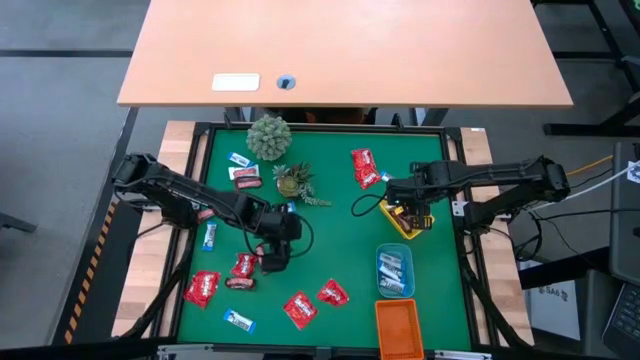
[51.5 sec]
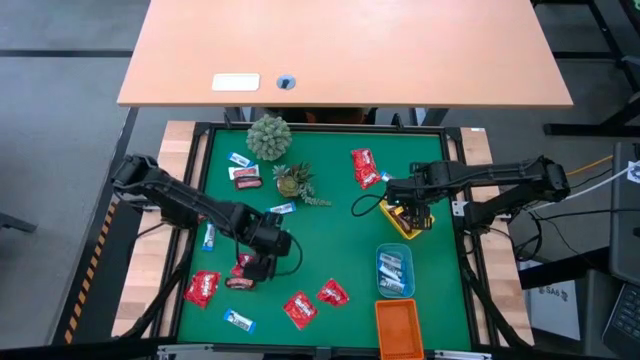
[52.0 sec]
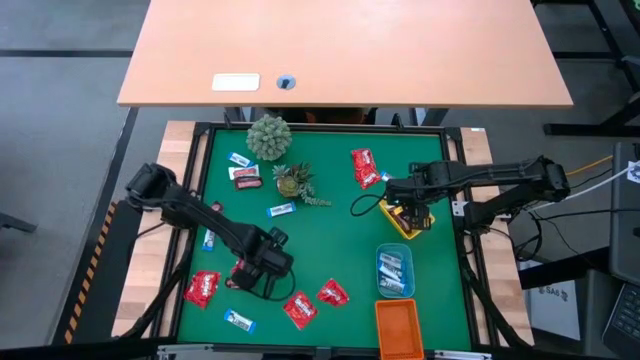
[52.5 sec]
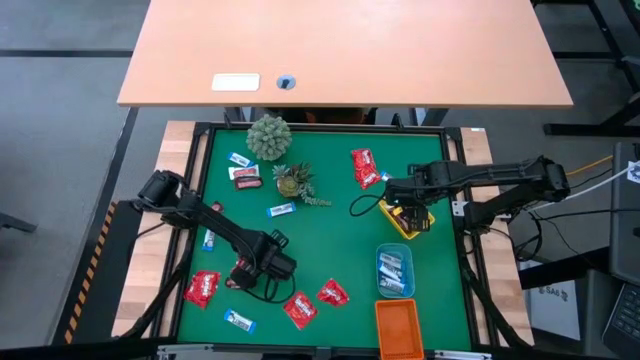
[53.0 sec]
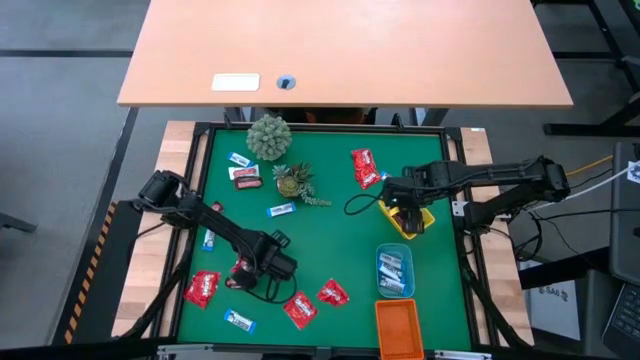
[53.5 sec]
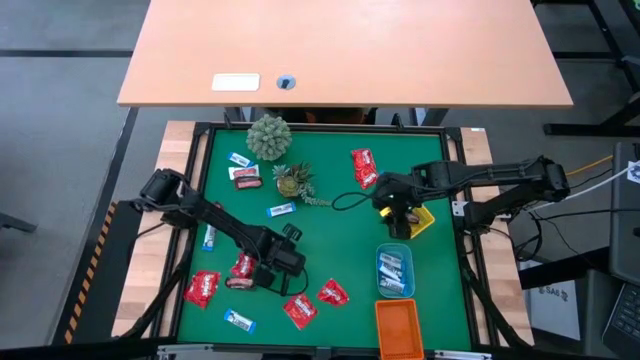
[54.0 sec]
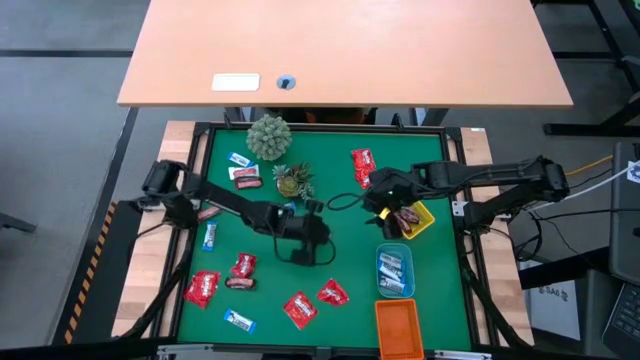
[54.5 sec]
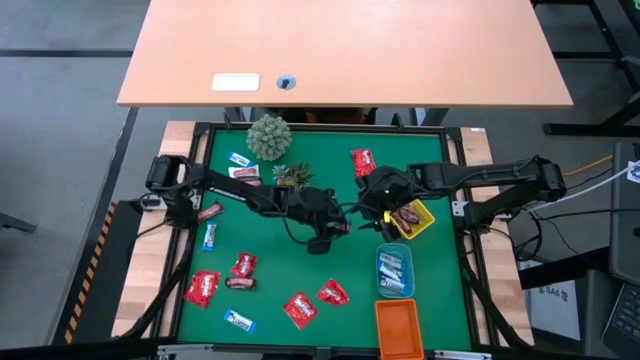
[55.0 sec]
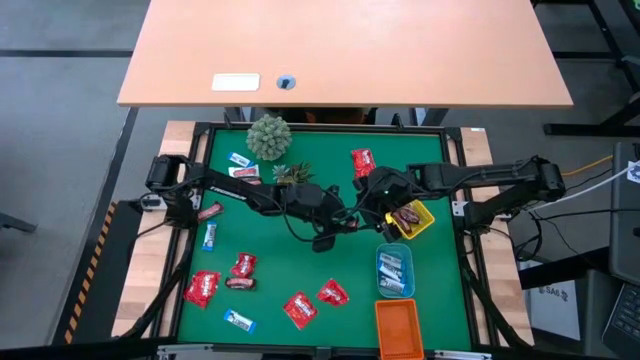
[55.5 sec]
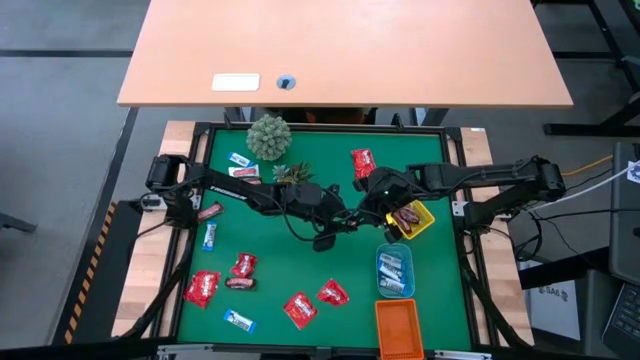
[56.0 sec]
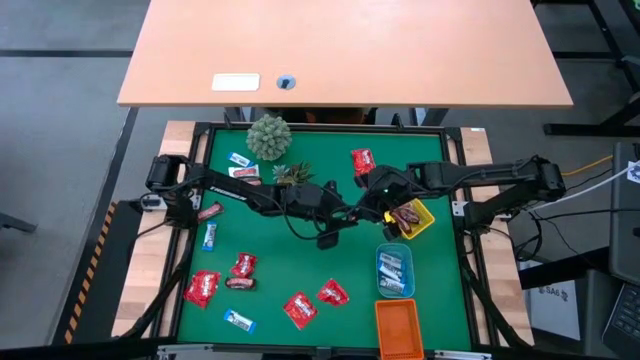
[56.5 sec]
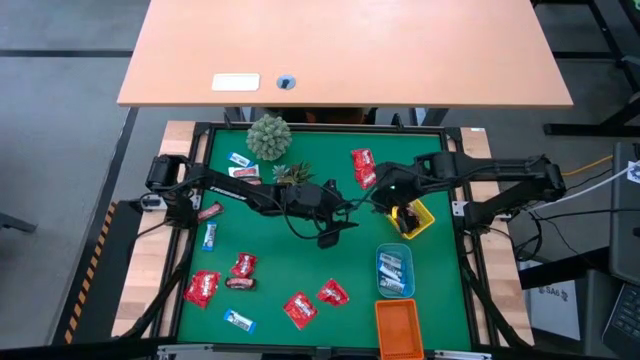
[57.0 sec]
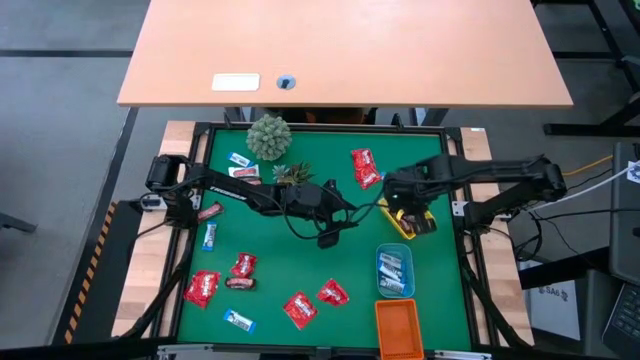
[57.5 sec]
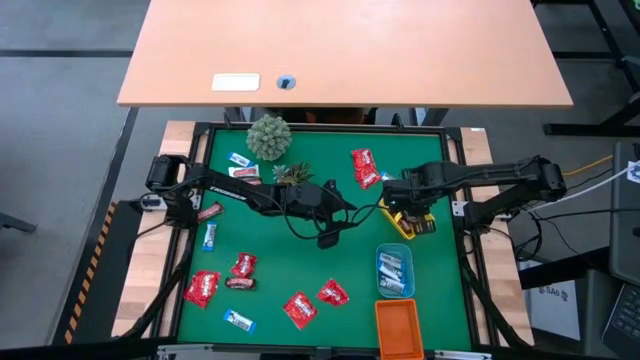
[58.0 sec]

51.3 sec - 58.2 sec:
Task: Sort candy
Put the brown candy into the yellow bin

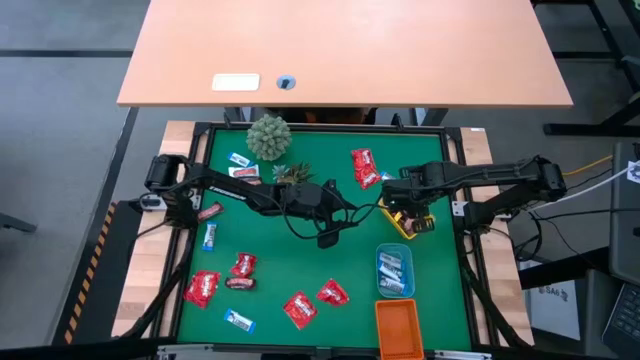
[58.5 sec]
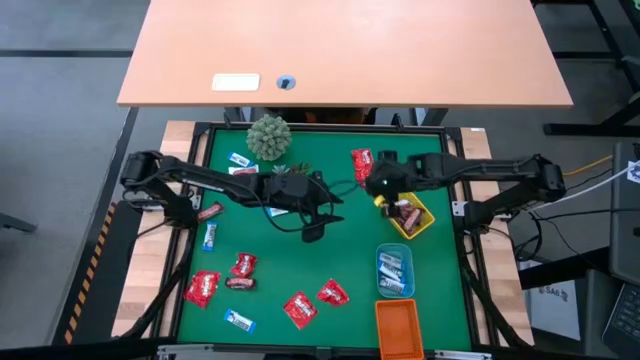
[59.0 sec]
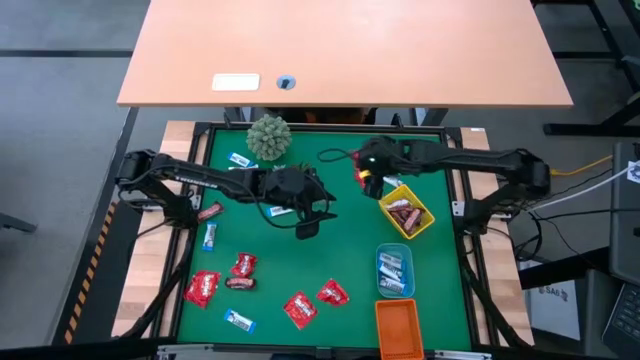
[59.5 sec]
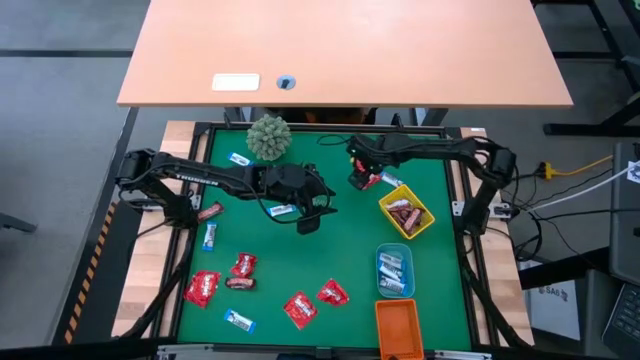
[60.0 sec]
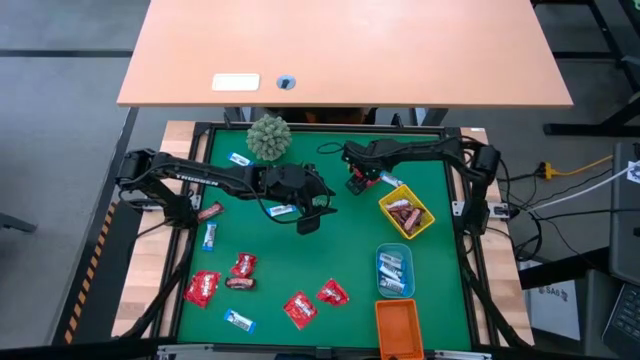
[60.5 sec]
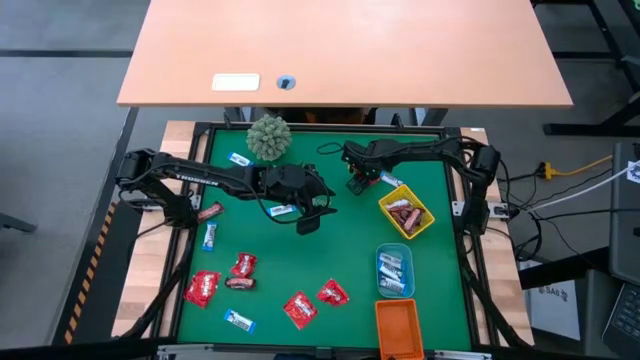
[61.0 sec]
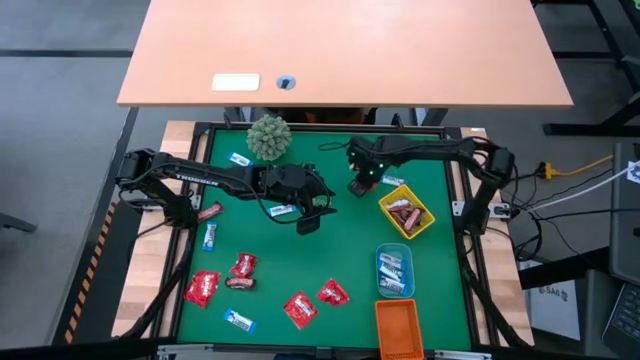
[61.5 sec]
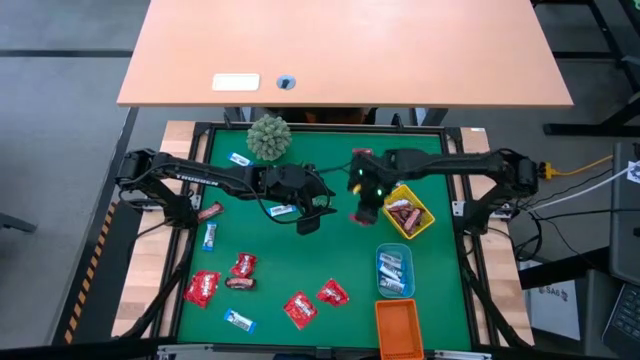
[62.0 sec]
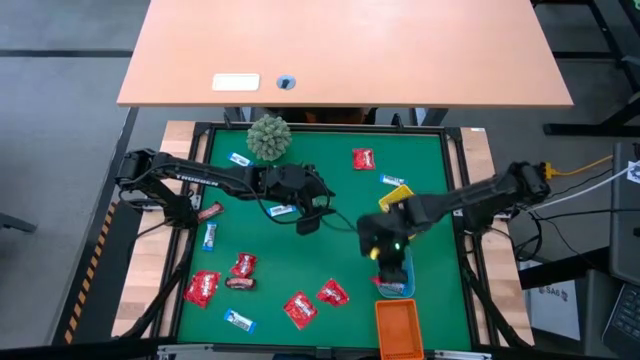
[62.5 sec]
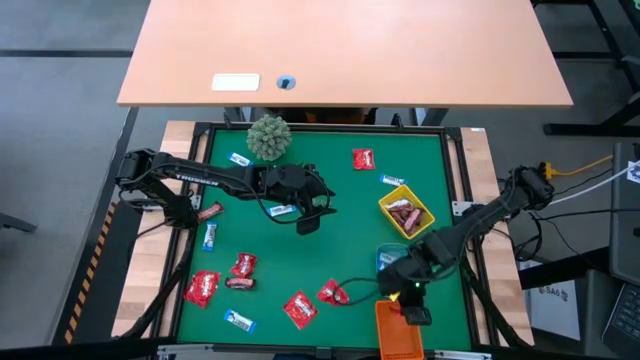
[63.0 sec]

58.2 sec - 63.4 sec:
Put the red candy into the orange bin

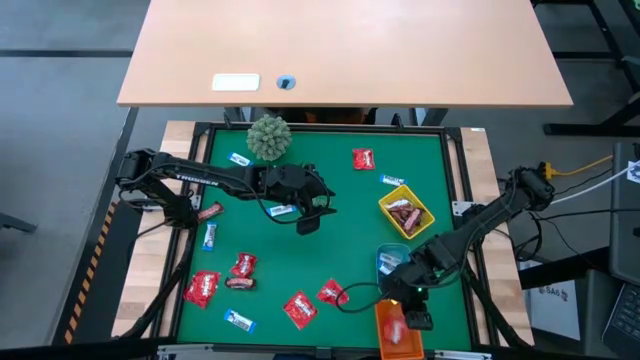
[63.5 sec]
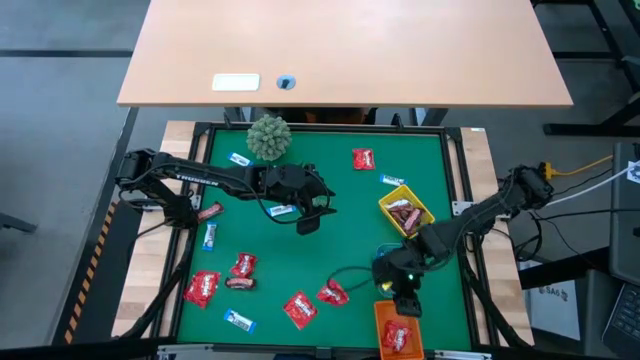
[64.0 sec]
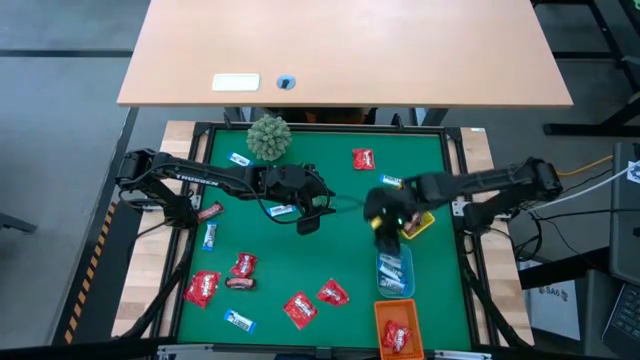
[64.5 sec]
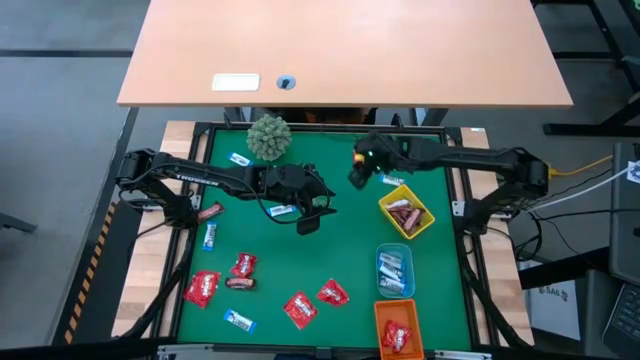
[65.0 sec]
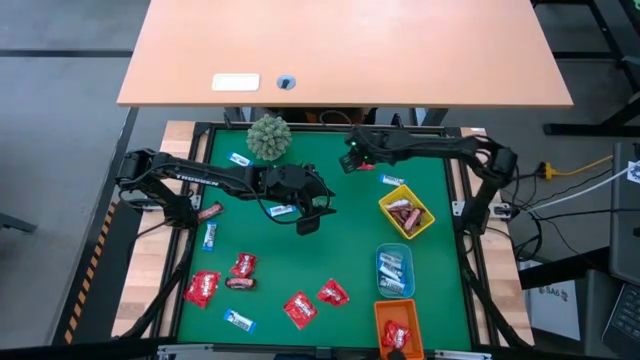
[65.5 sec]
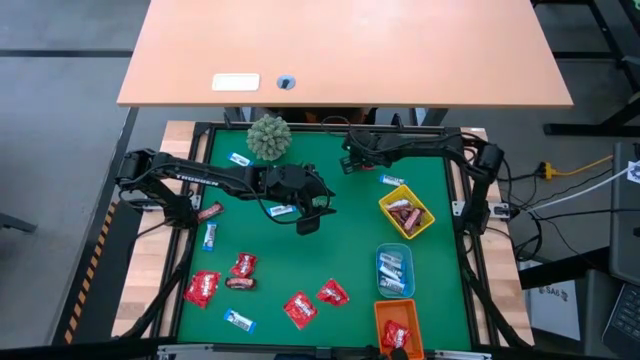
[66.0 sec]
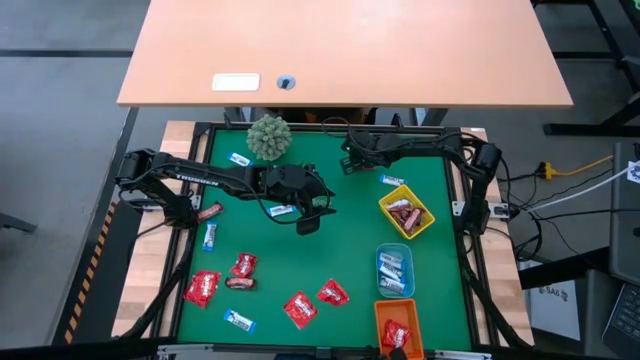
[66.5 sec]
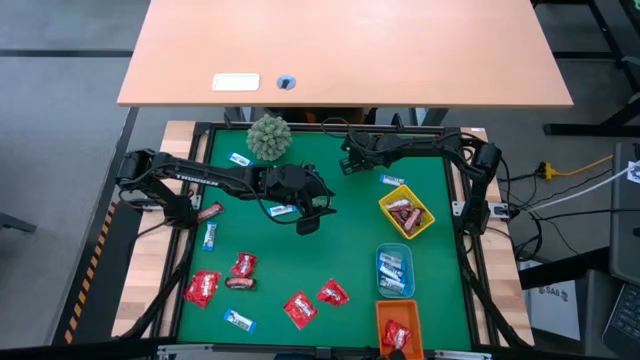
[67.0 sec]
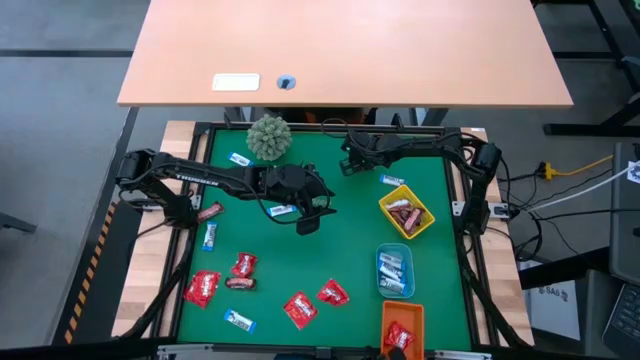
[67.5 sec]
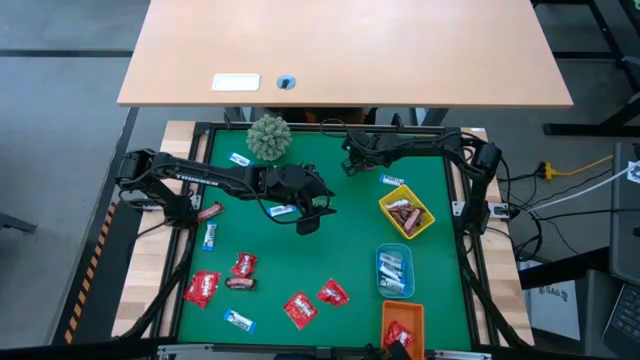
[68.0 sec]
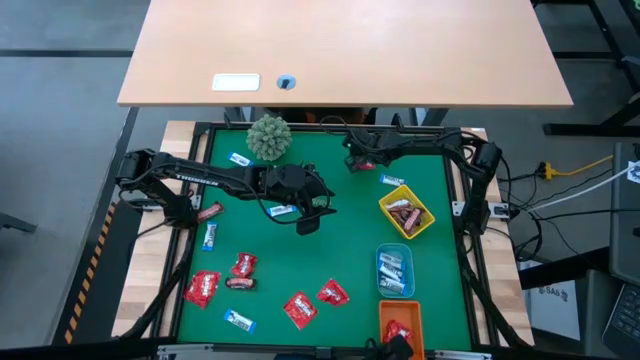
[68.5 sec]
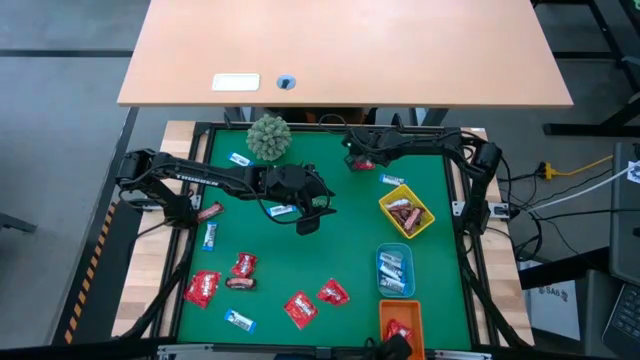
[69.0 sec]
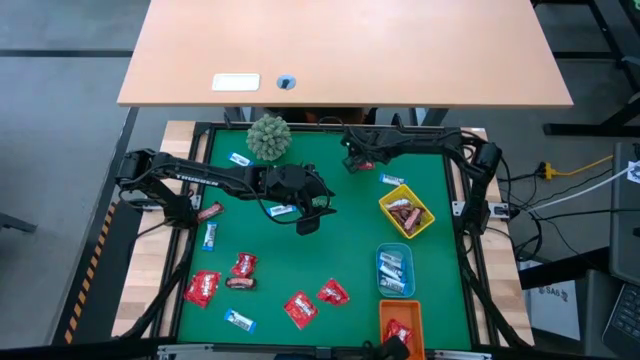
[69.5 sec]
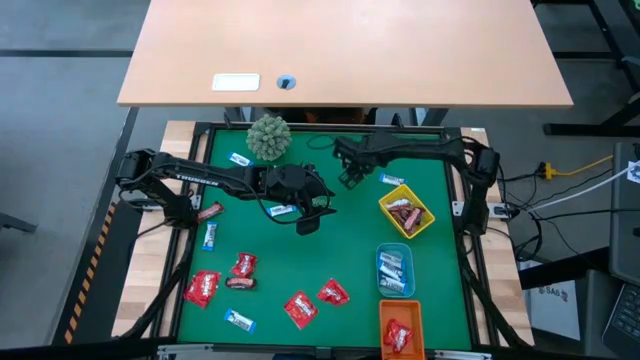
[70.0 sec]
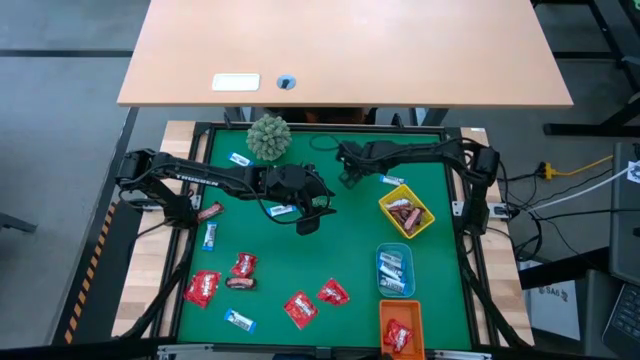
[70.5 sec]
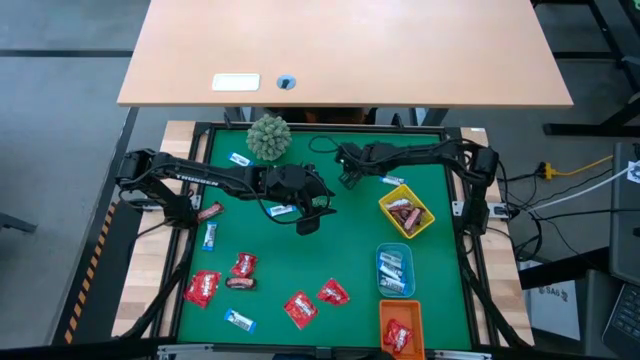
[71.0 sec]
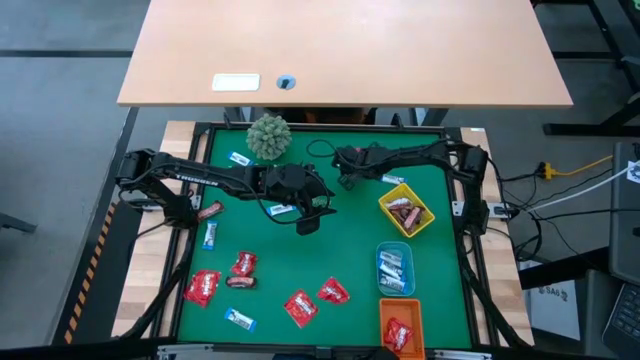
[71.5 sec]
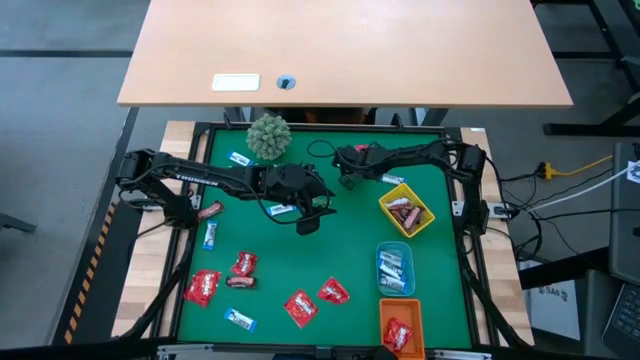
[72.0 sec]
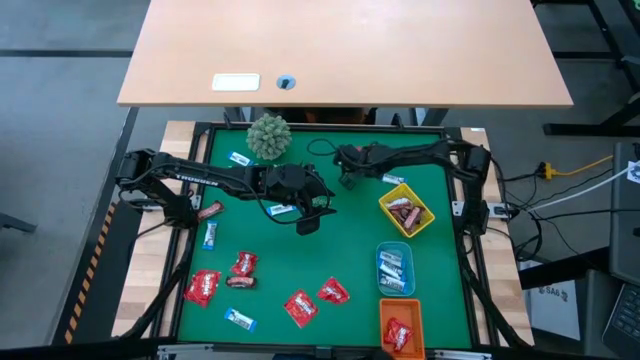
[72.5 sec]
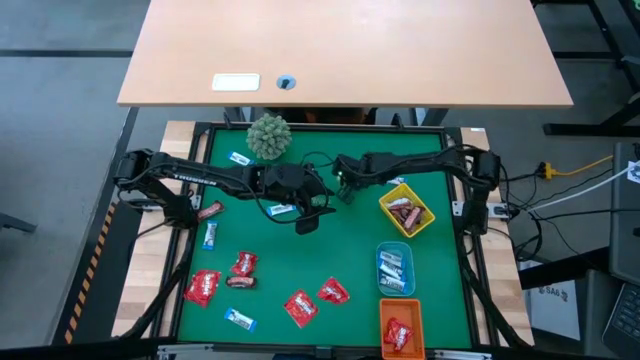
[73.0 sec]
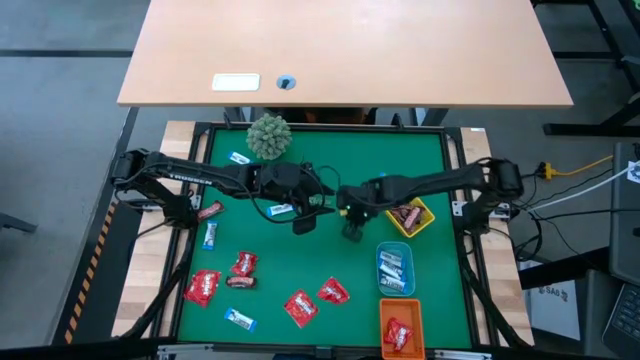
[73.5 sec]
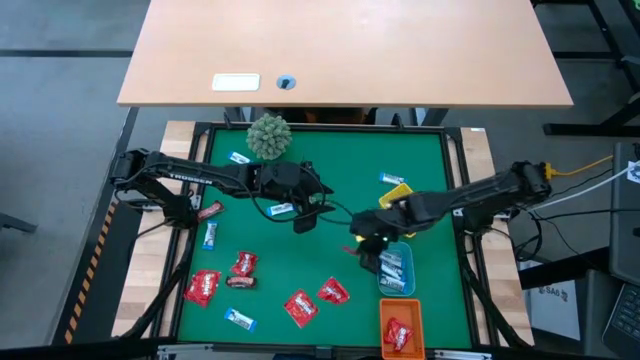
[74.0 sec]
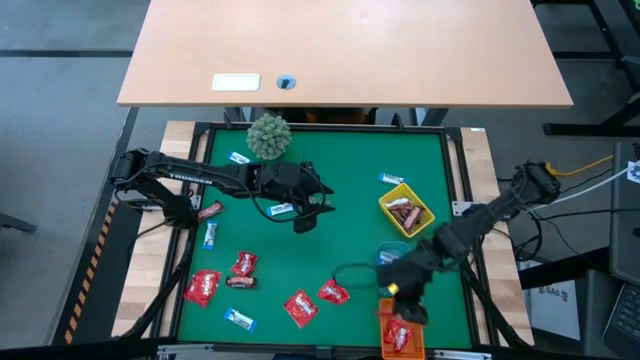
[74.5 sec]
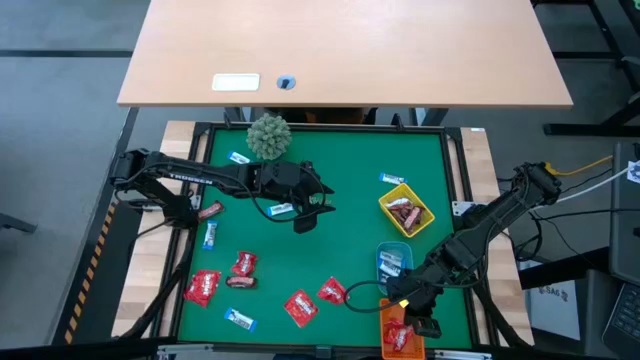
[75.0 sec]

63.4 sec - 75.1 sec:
Put the red candy into the orange bin
